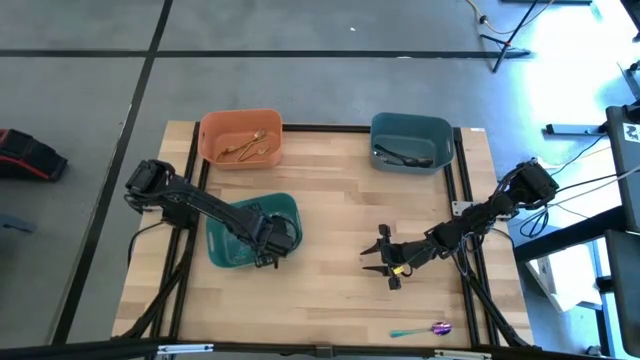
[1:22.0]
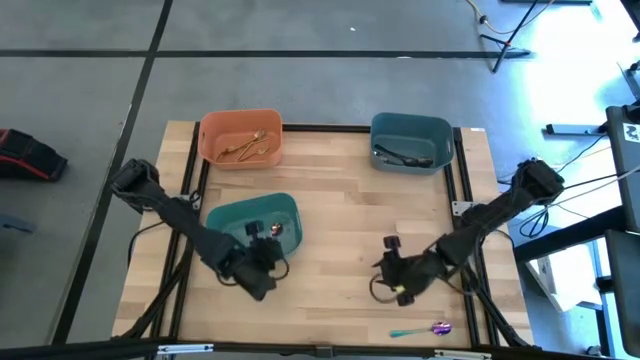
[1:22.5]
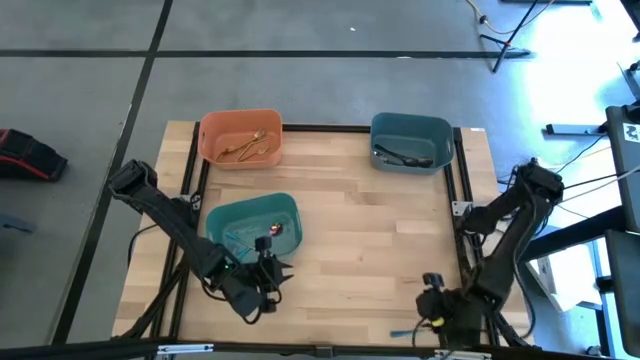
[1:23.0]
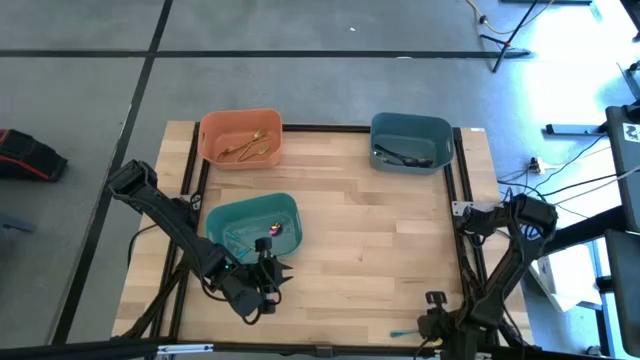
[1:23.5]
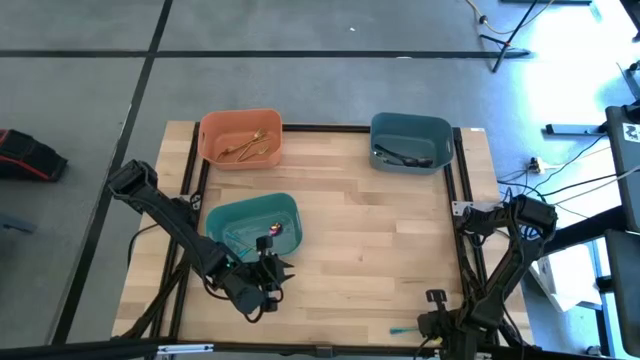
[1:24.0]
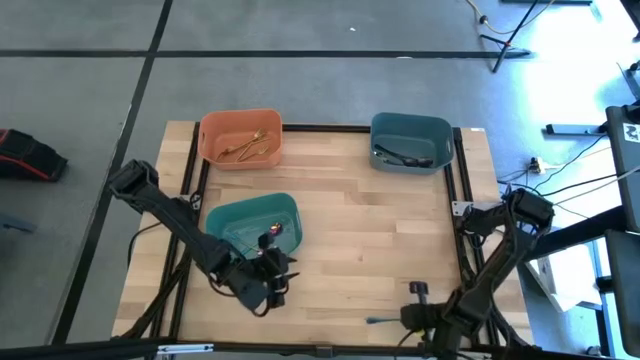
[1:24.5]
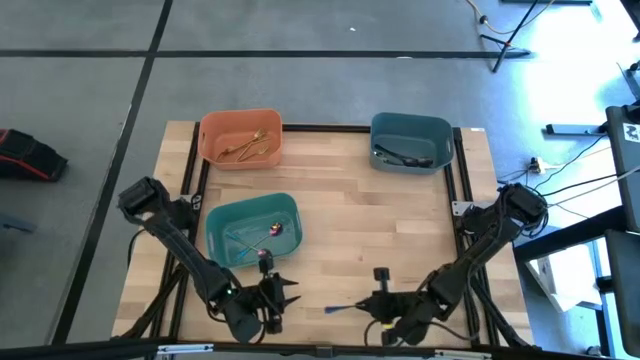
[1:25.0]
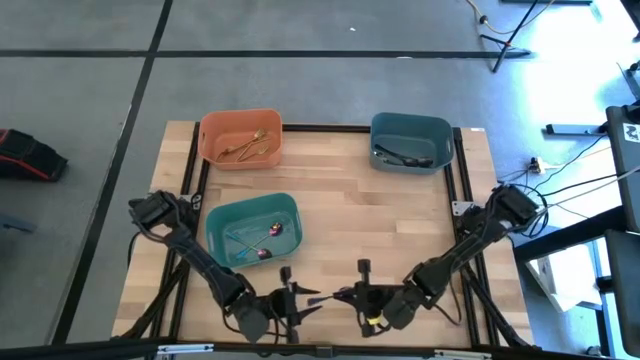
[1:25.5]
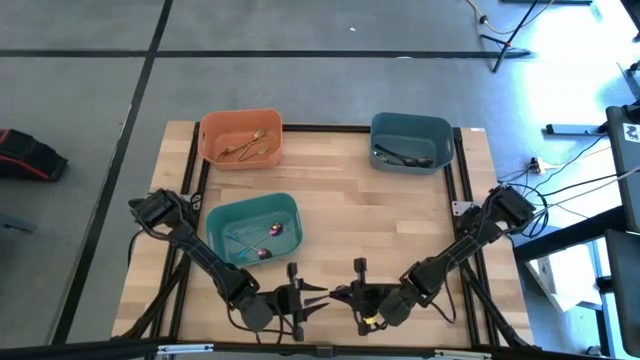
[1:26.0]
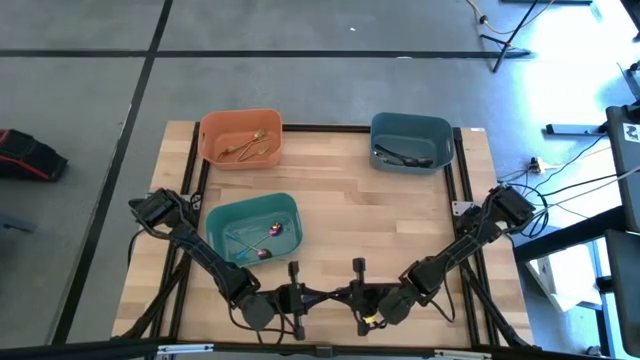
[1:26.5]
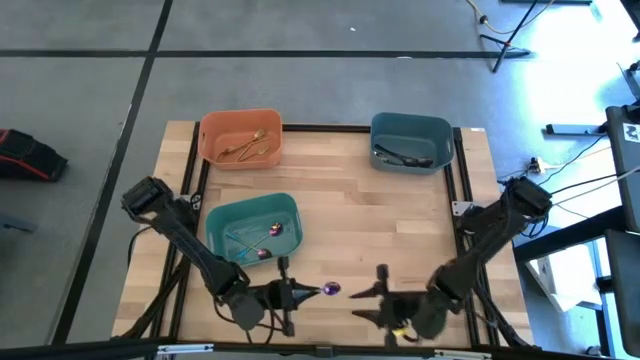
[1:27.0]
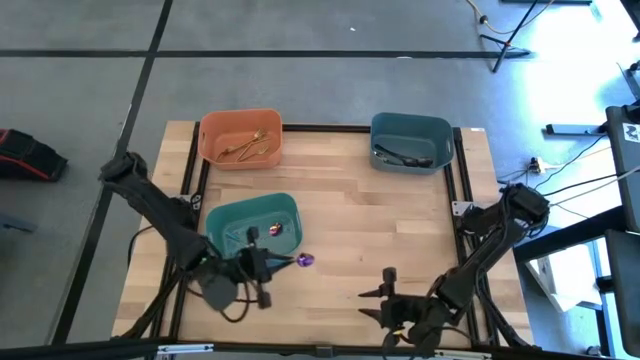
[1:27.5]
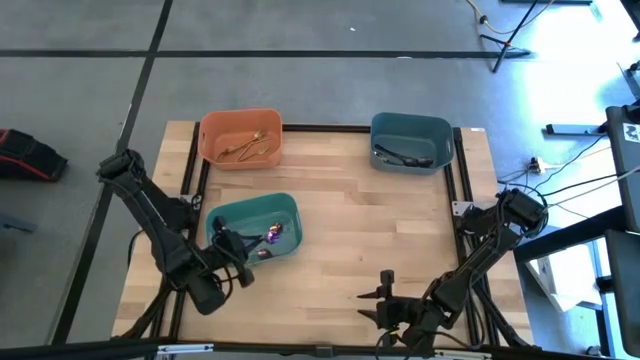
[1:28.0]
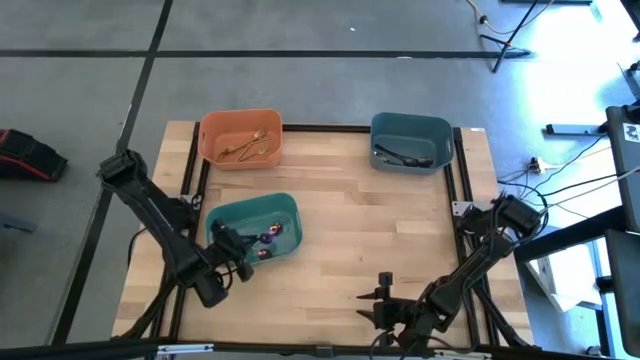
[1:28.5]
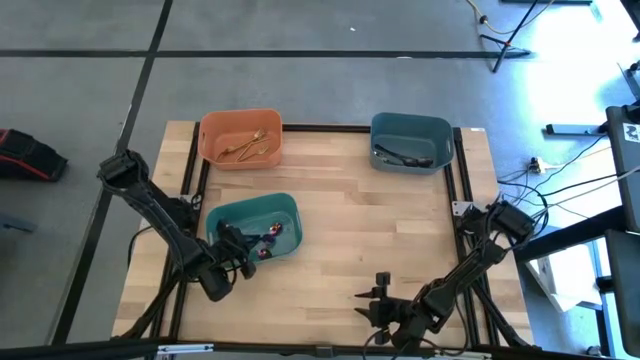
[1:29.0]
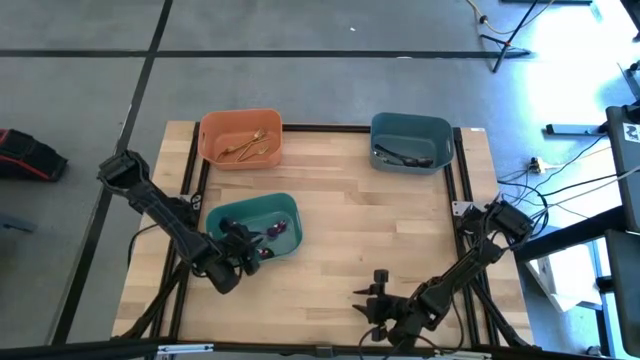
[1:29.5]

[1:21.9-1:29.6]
Task: Sort silverware by color (type)
Put the blue spoon into the bottom blue bin

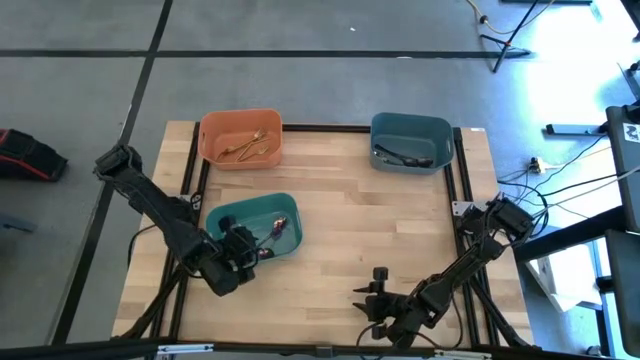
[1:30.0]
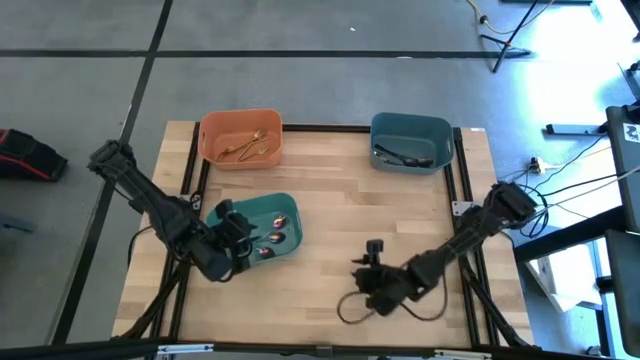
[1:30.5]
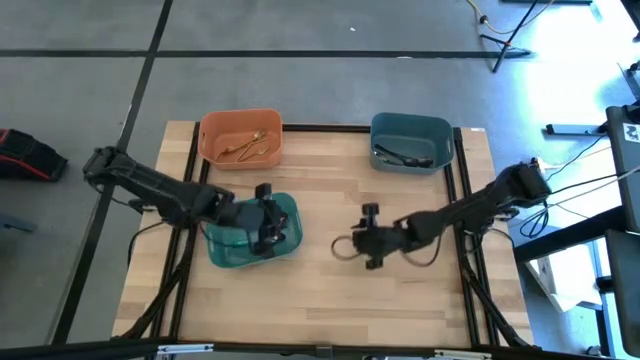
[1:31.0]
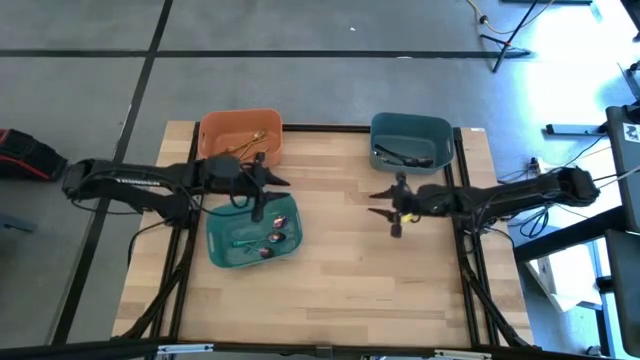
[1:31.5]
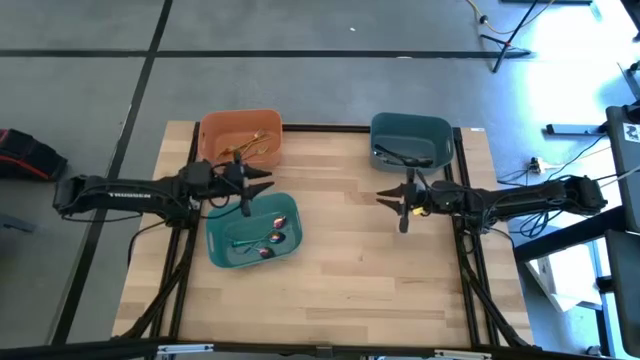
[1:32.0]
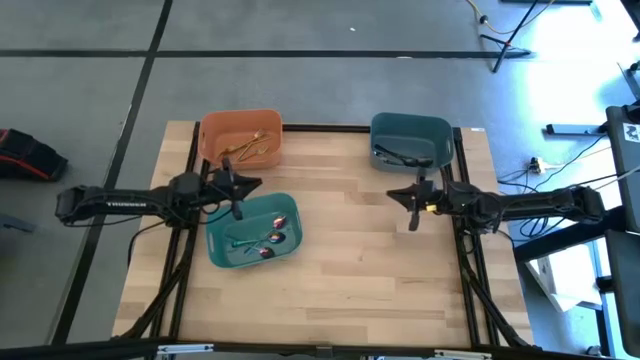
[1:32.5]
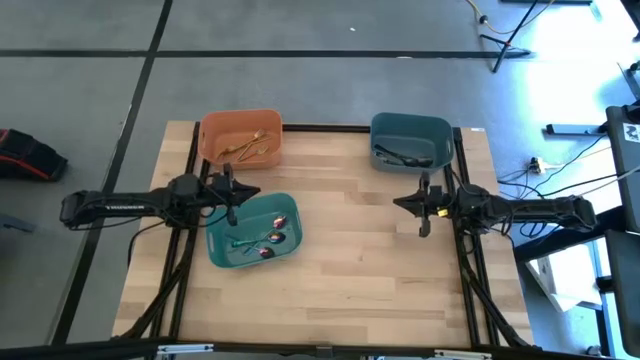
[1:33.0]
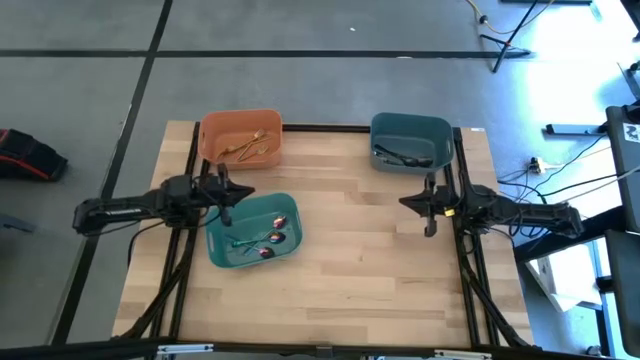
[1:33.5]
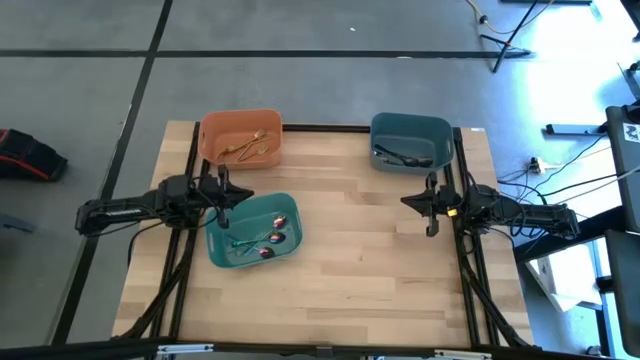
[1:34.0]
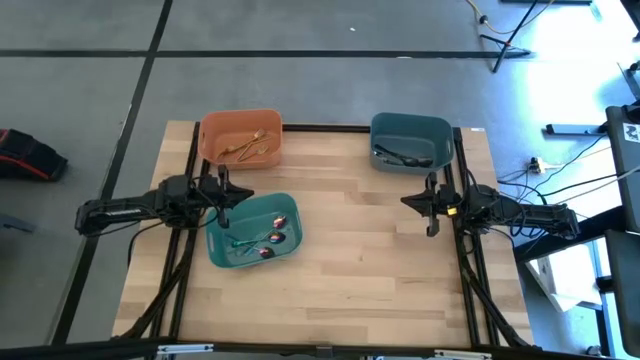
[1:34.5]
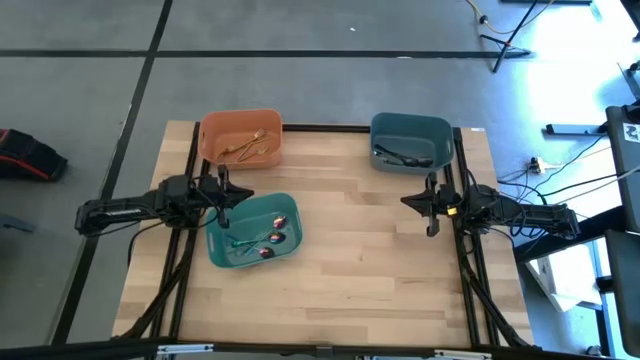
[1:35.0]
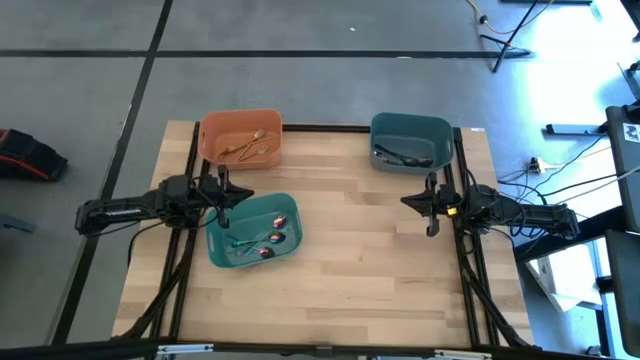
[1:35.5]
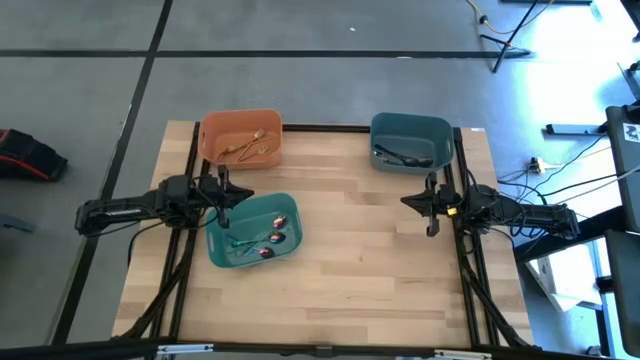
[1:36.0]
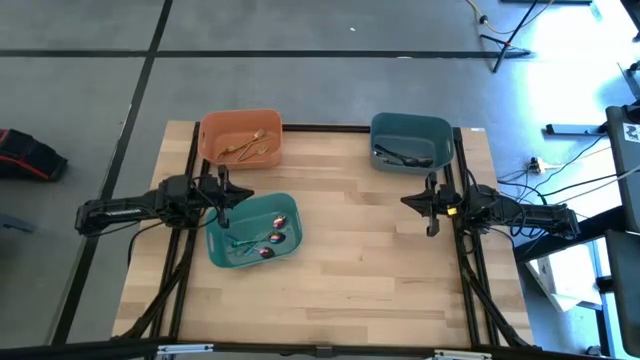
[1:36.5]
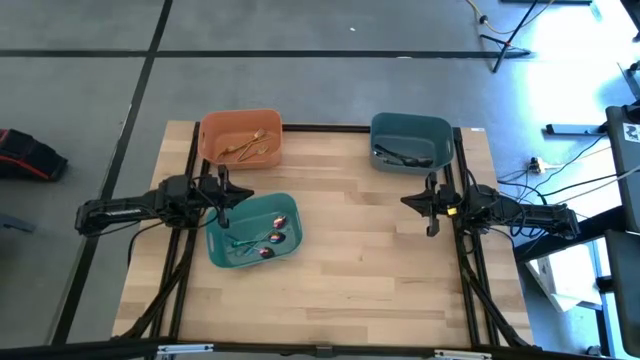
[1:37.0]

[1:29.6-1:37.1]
Return to Home Position

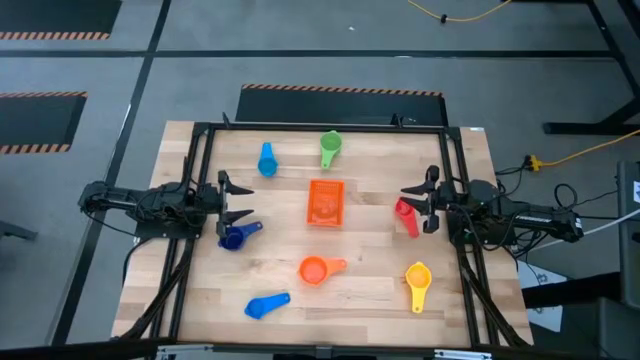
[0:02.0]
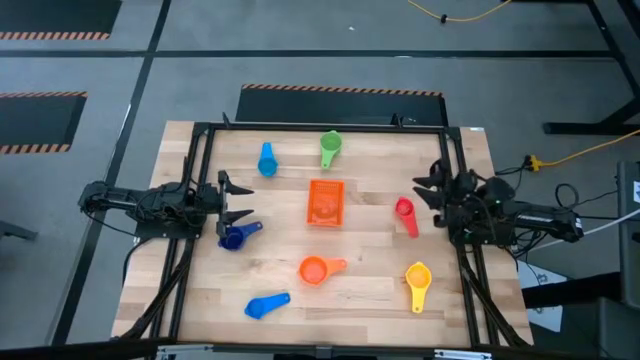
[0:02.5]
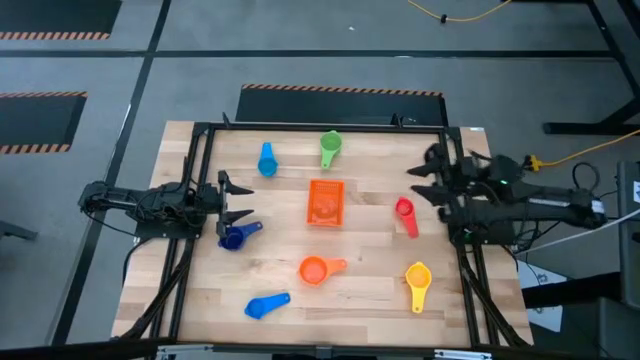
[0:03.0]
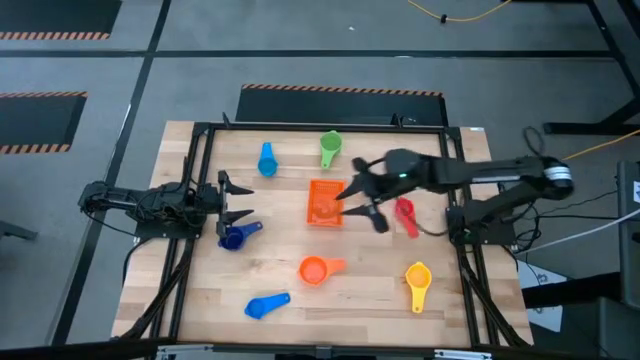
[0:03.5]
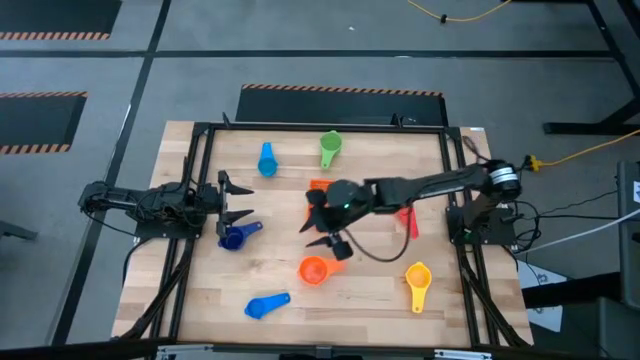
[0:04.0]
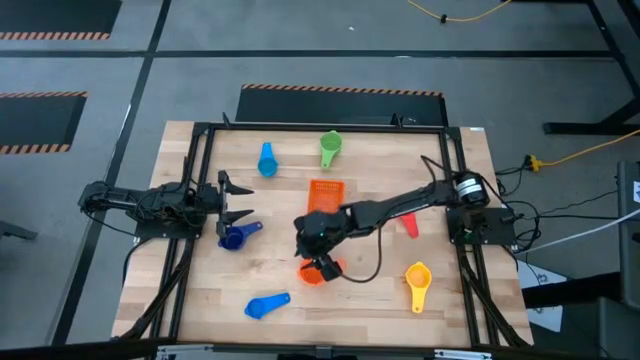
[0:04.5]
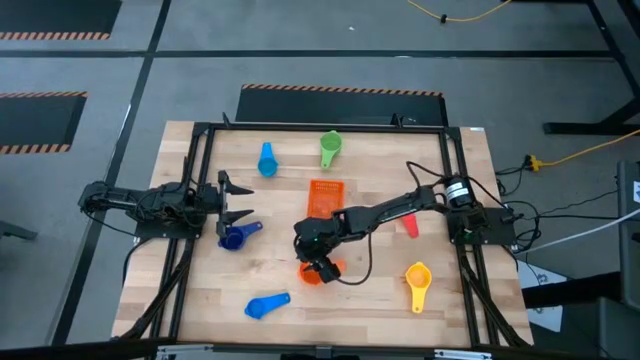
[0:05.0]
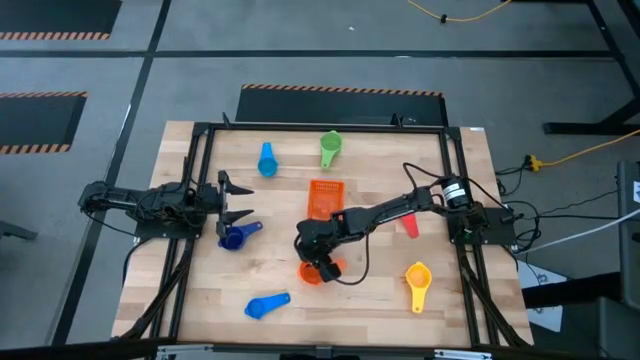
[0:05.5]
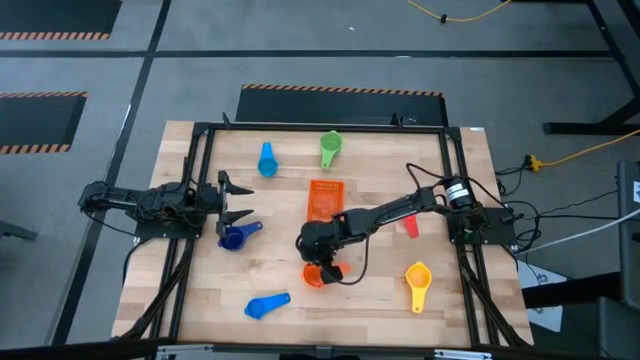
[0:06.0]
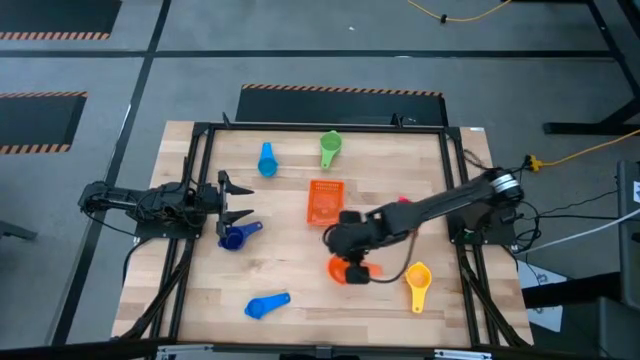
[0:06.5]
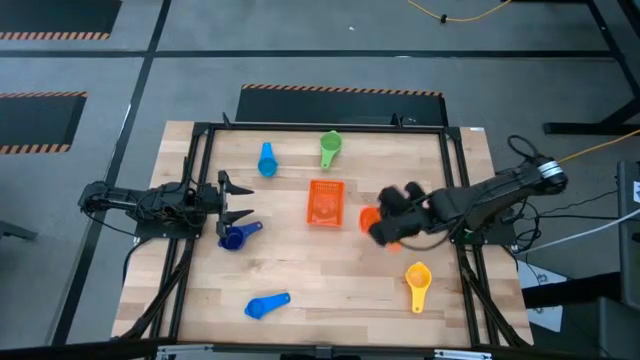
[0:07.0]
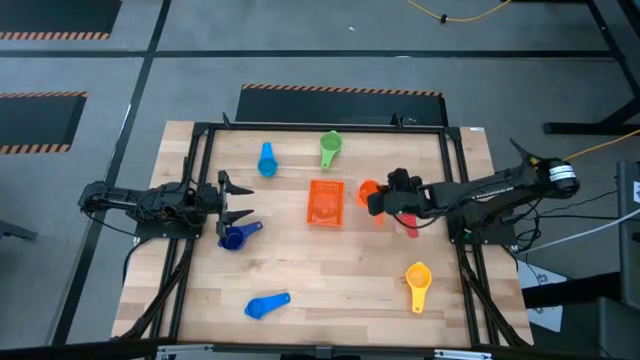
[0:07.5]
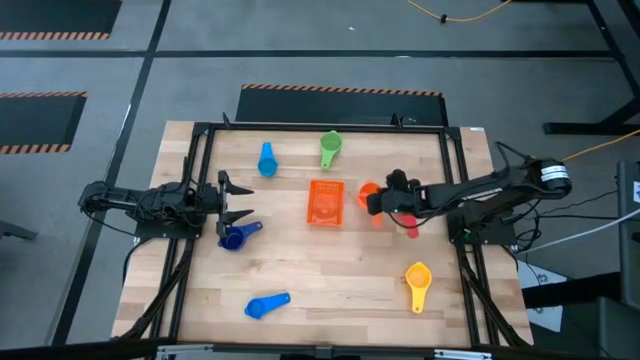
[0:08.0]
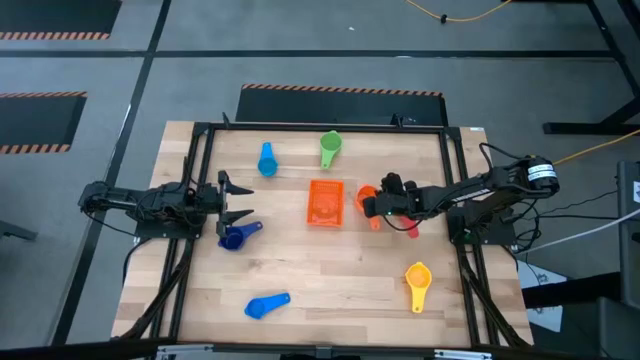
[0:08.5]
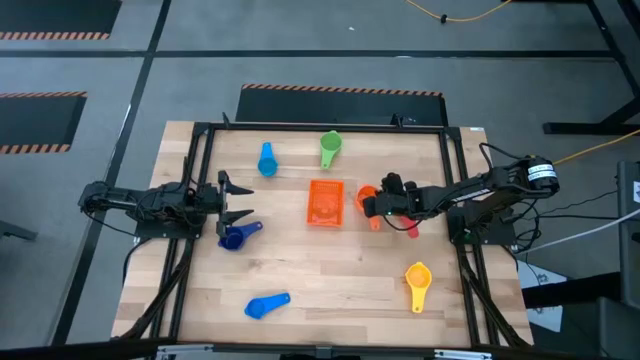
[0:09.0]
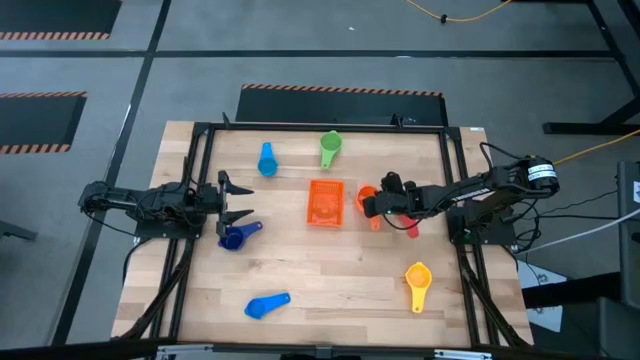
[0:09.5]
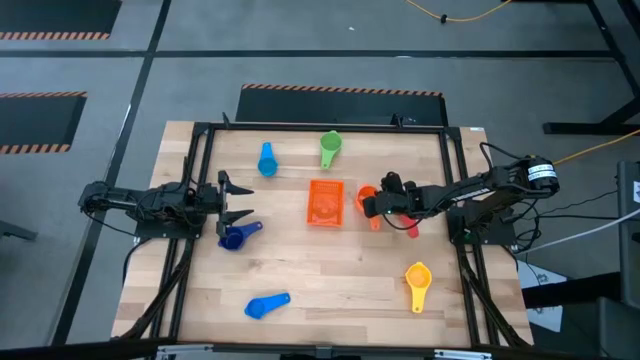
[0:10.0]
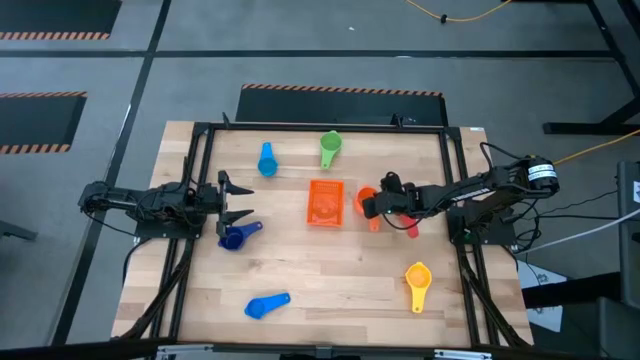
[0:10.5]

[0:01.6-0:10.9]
Task: Nest measuring cups in basket
Move the orange measuring cup to the center
